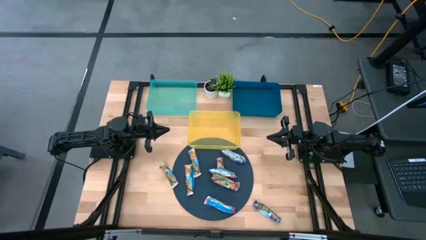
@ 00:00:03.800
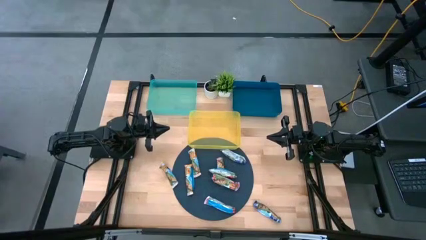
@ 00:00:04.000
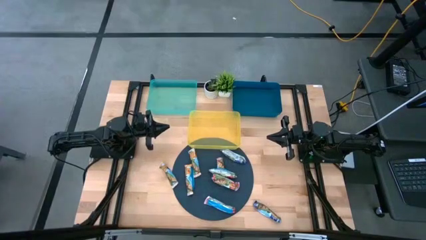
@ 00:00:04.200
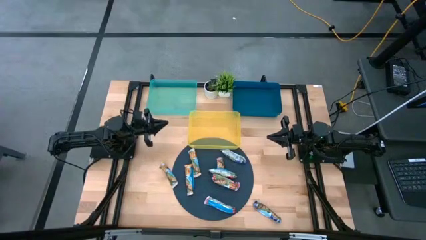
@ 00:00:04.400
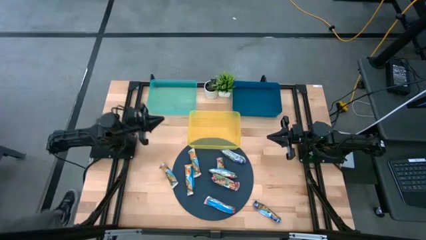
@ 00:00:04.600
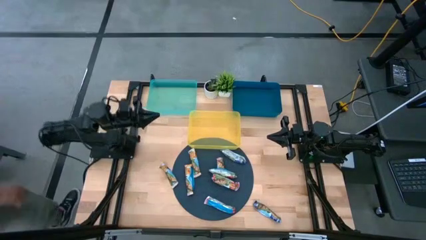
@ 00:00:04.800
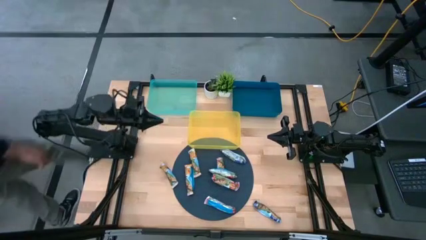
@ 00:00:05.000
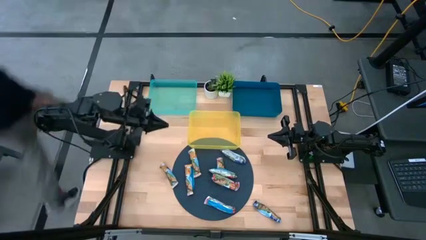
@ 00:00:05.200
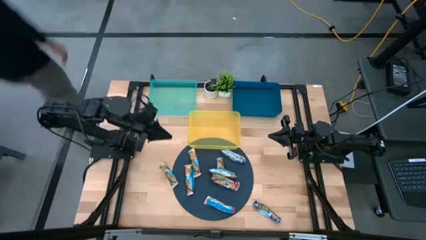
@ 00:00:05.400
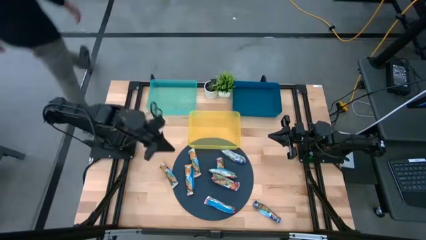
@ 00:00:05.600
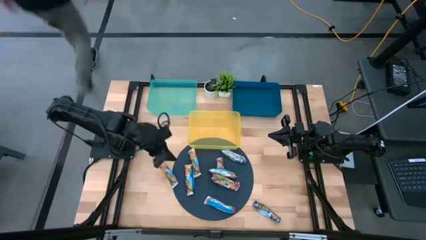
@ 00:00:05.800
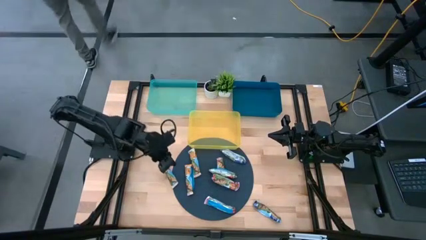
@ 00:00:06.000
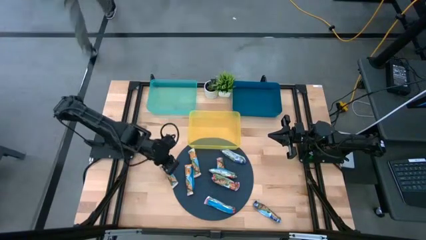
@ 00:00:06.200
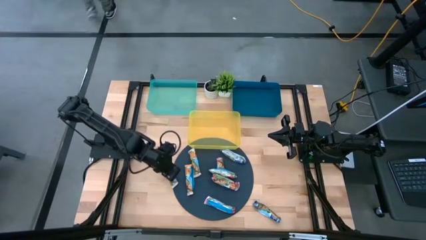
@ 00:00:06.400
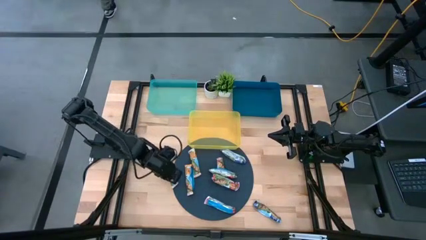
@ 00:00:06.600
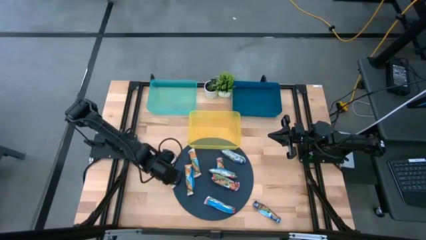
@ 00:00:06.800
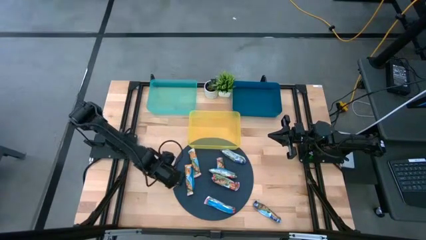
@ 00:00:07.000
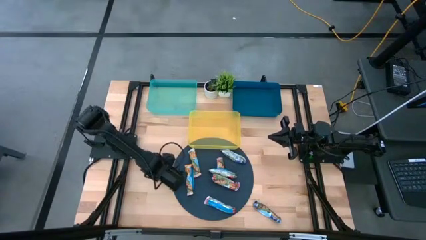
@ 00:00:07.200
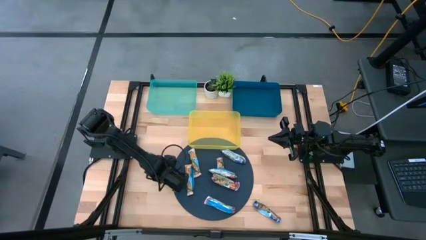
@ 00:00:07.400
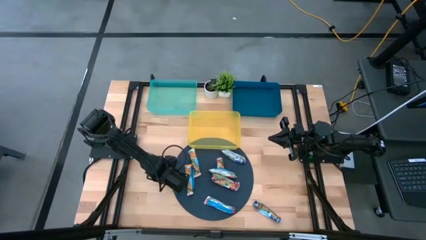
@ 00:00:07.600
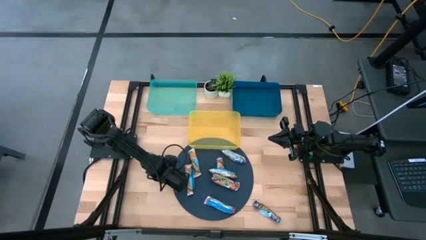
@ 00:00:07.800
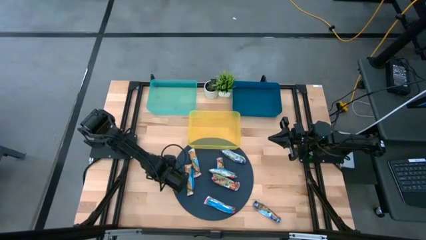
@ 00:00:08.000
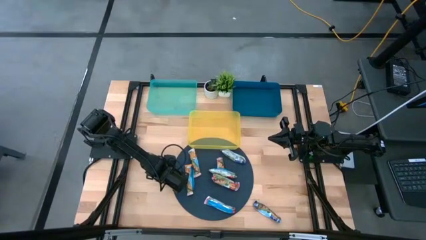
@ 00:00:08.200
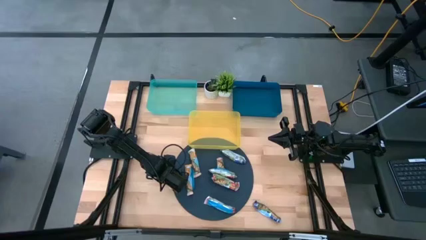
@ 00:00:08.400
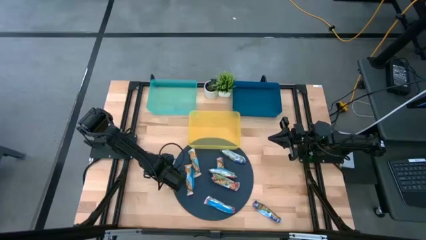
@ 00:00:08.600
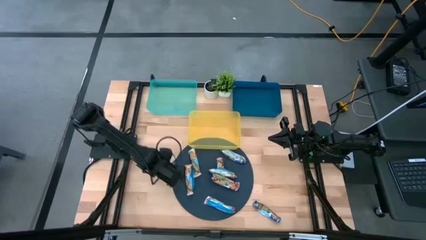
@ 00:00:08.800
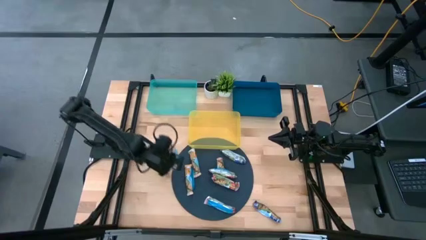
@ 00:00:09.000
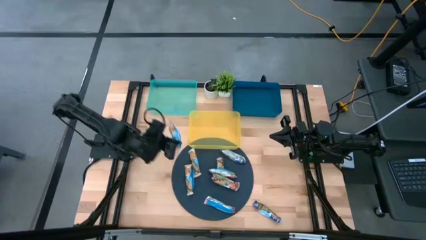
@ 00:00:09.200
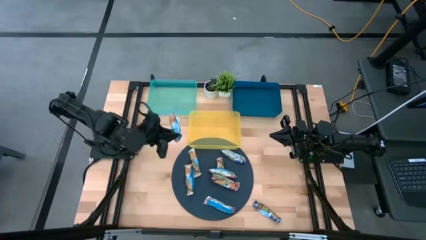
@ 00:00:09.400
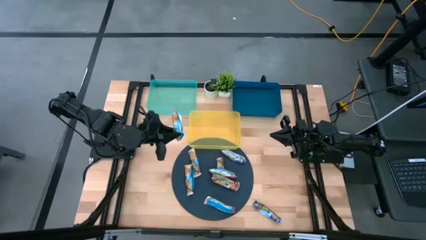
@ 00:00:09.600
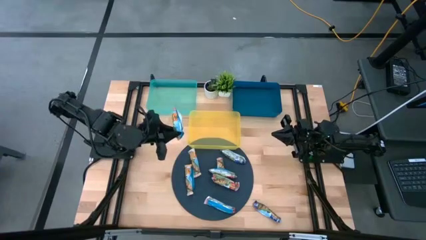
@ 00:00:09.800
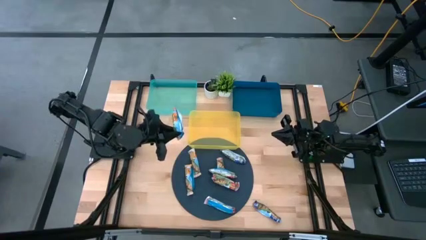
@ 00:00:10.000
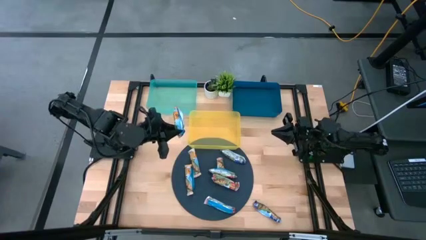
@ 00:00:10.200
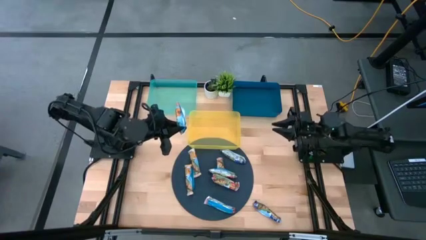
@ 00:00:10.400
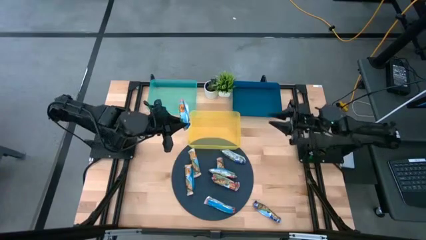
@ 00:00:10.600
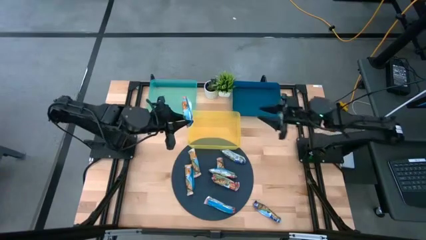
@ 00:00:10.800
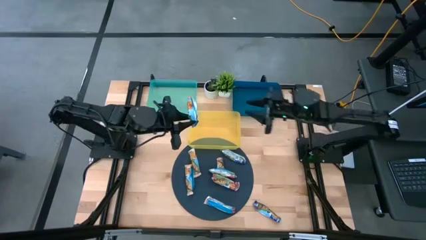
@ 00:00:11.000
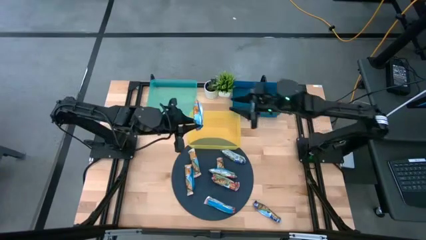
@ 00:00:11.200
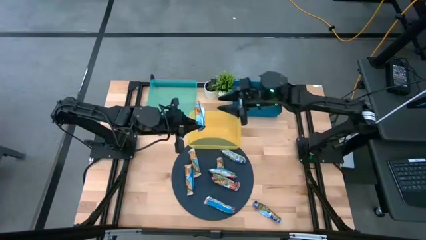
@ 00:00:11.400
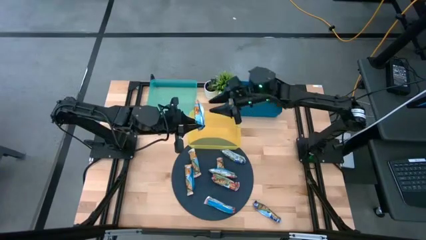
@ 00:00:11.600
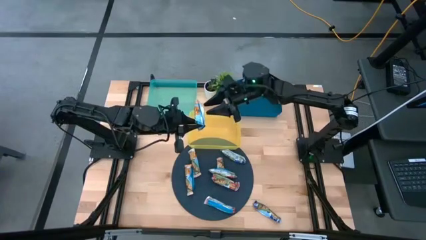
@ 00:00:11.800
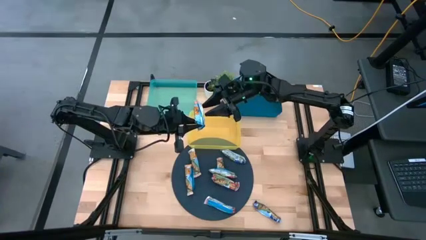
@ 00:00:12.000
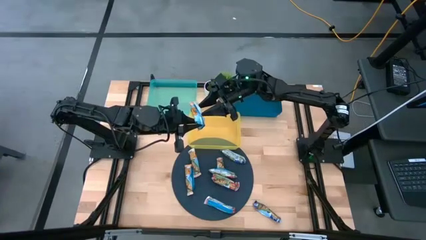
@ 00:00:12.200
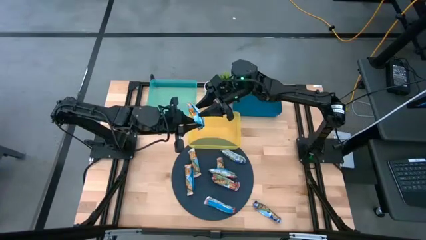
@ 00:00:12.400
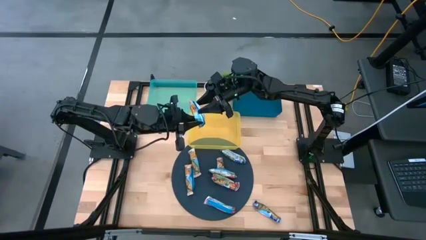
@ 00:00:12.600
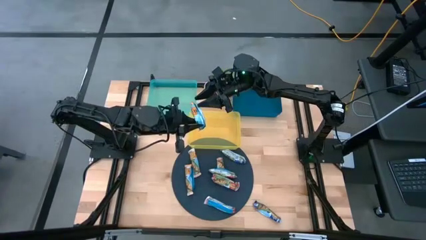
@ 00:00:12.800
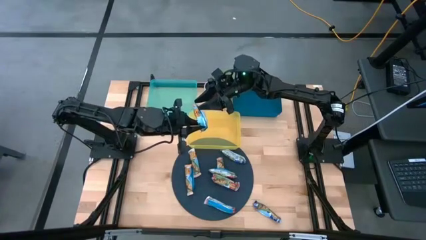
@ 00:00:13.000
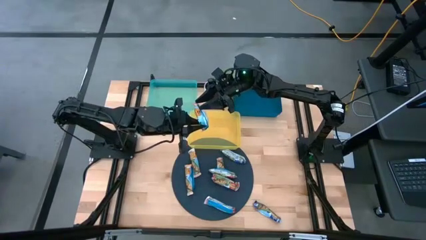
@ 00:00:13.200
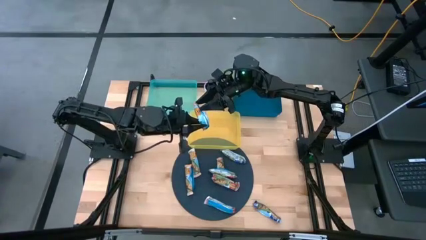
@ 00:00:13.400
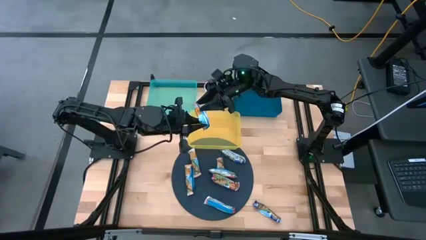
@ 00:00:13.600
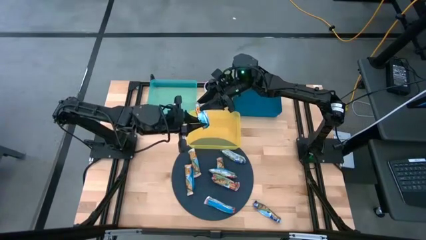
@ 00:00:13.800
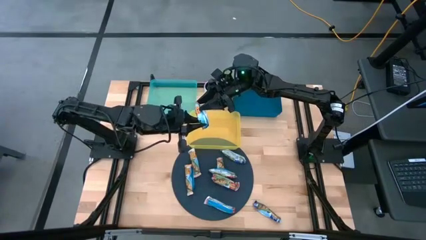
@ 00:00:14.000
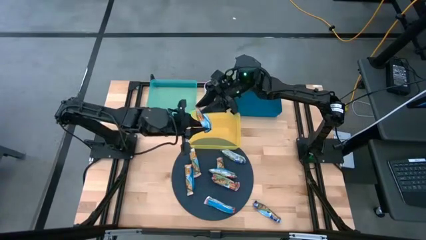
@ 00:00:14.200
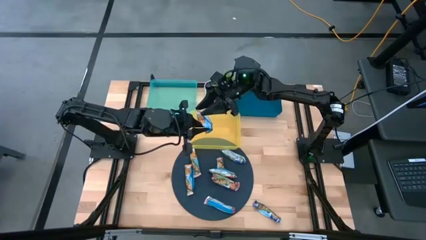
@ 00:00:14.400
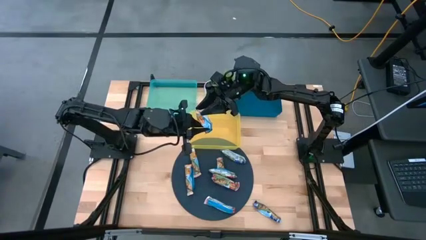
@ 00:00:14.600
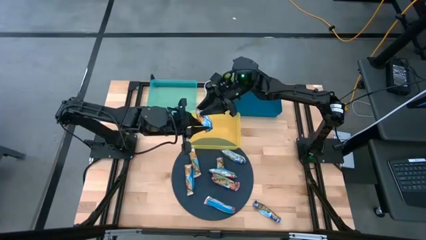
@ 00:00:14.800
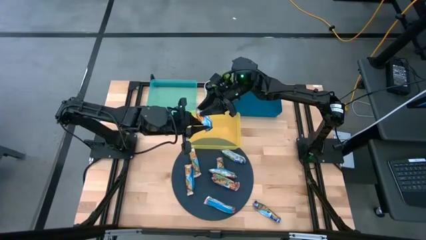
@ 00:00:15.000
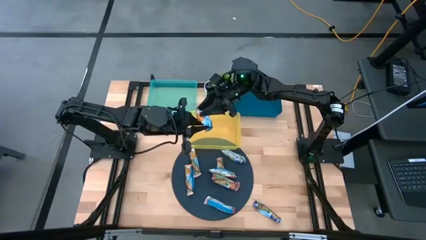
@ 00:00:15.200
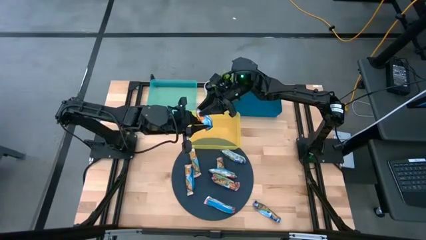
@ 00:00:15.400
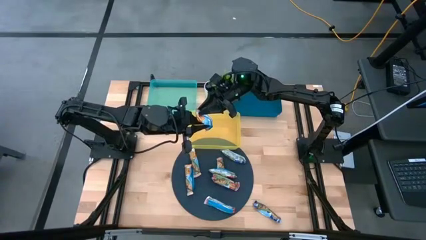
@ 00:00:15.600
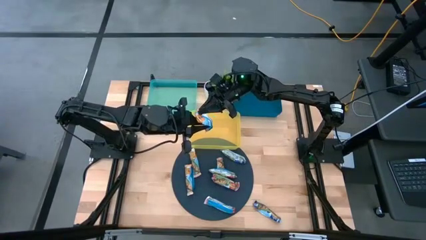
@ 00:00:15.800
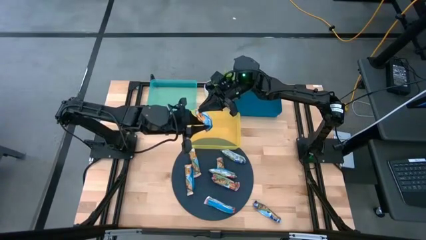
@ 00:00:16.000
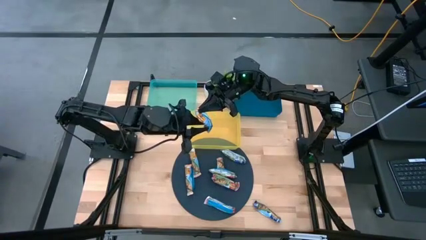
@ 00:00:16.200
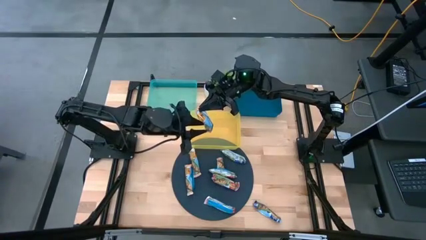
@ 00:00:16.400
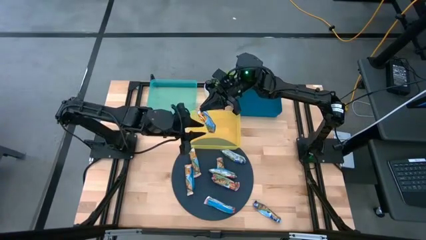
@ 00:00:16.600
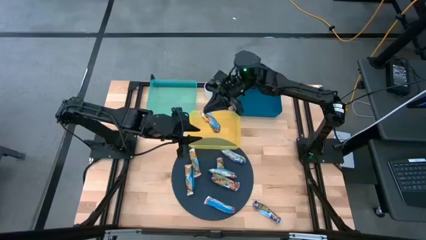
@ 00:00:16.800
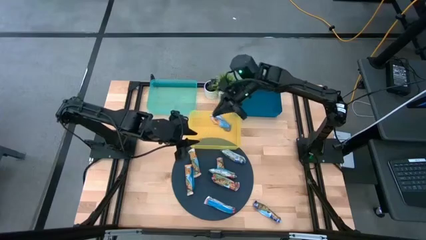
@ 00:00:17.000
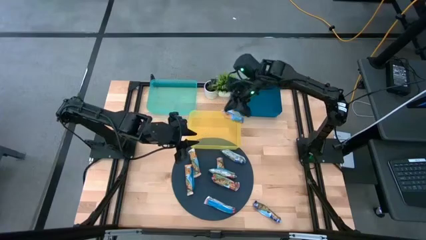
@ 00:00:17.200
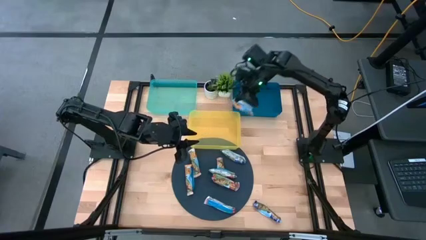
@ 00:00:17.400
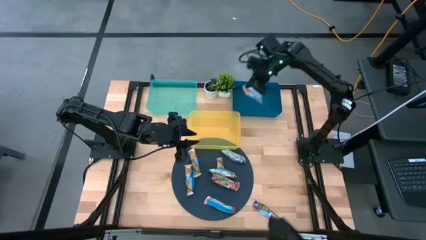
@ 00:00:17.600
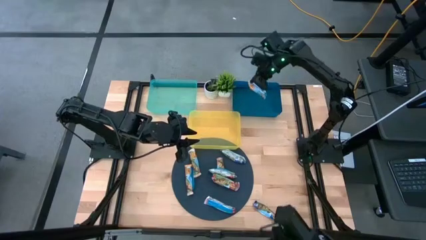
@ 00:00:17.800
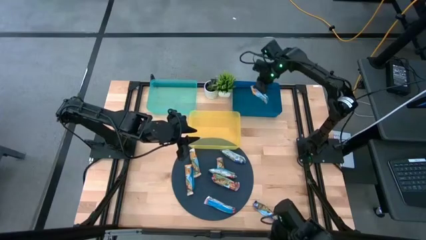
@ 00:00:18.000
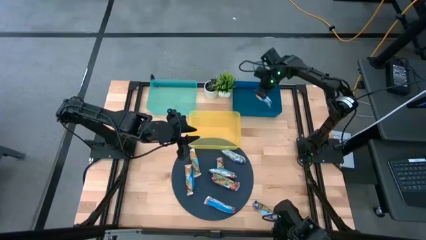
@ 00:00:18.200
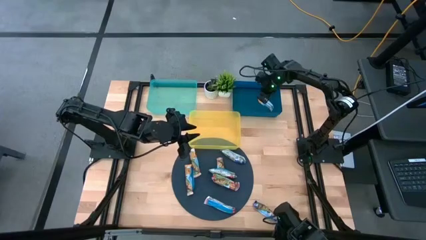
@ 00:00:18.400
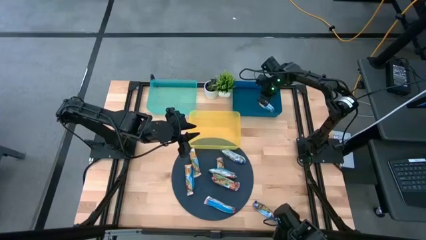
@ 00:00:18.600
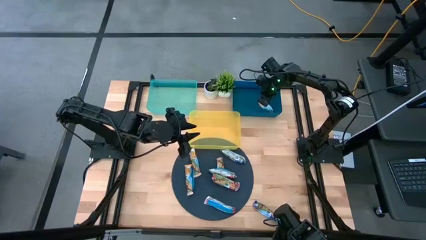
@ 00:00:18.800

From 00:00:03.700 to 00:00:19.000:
Task: Pick and place Granola Bars by type
Put the yellow granola bar into the blue bin
